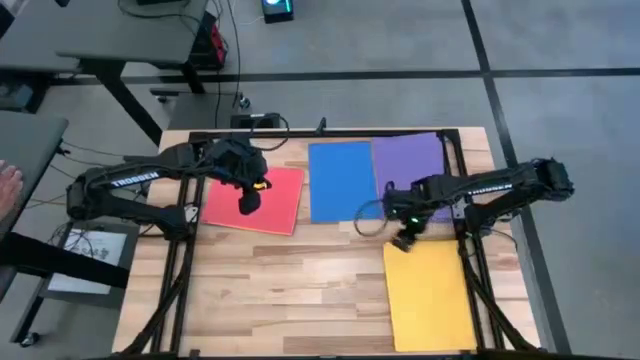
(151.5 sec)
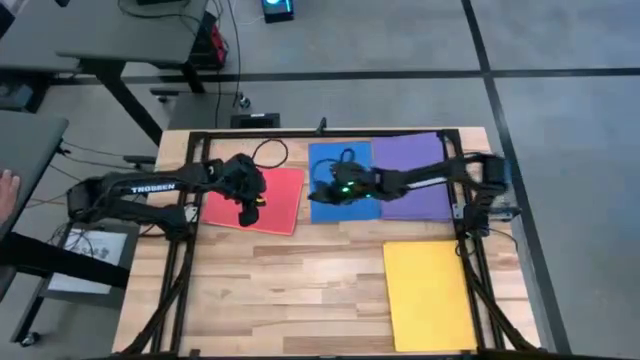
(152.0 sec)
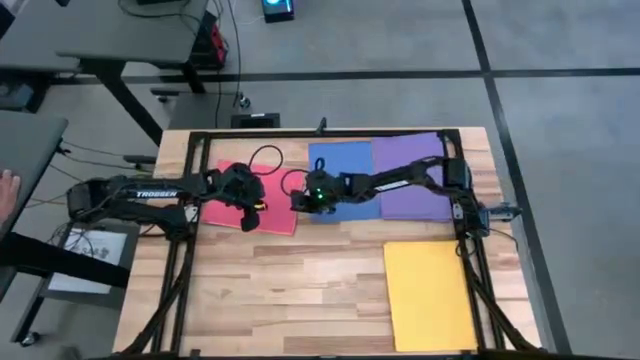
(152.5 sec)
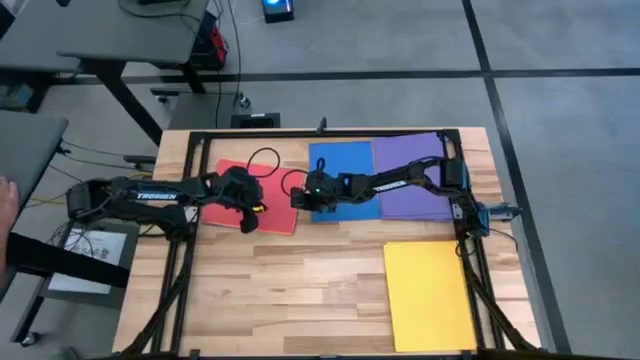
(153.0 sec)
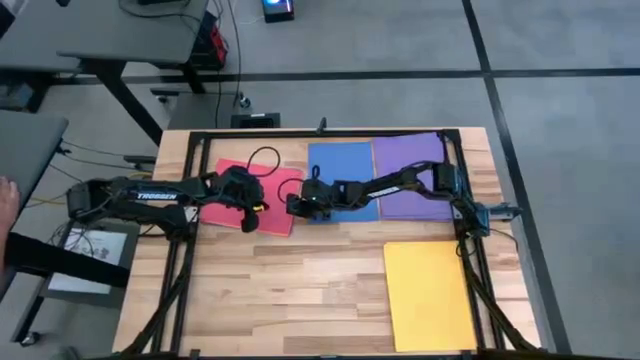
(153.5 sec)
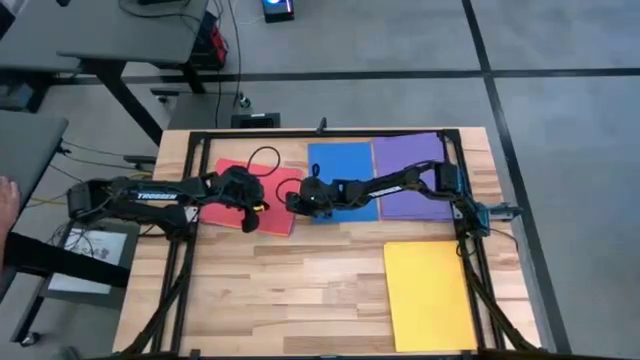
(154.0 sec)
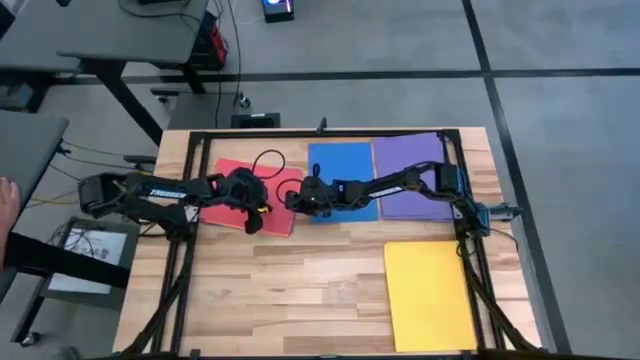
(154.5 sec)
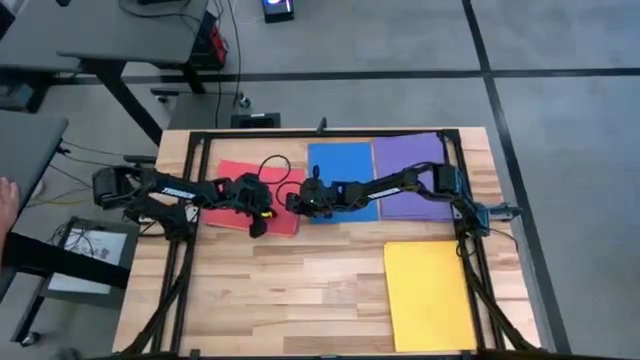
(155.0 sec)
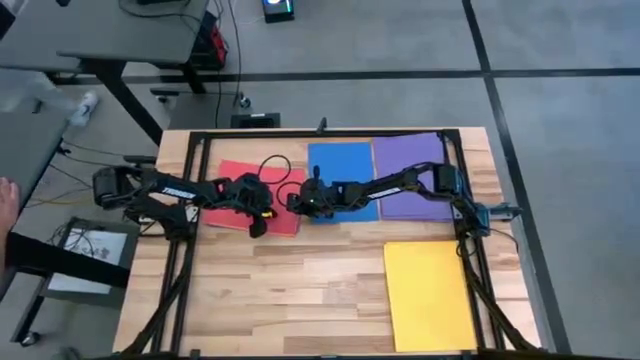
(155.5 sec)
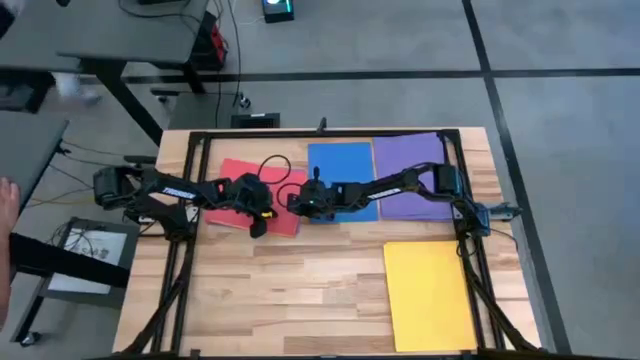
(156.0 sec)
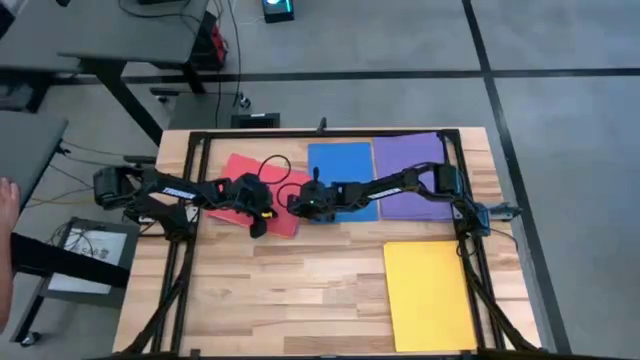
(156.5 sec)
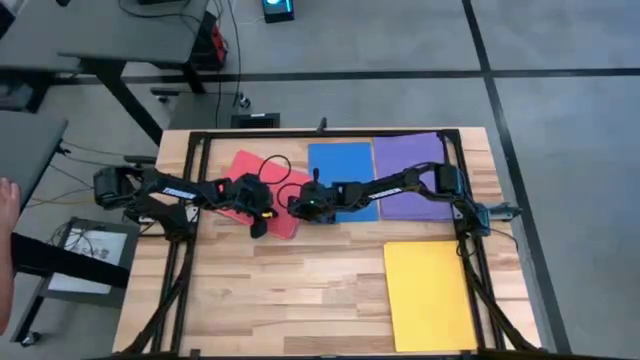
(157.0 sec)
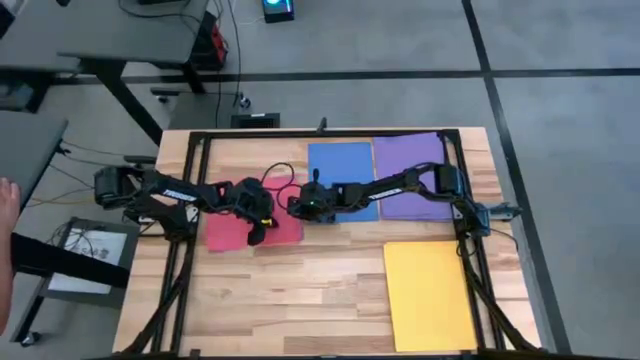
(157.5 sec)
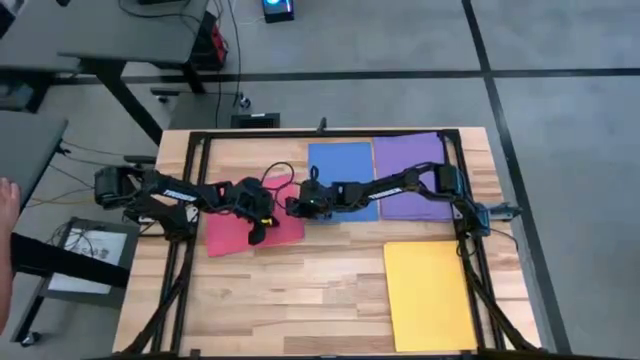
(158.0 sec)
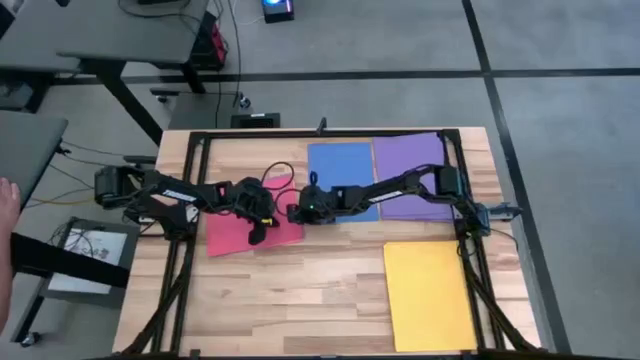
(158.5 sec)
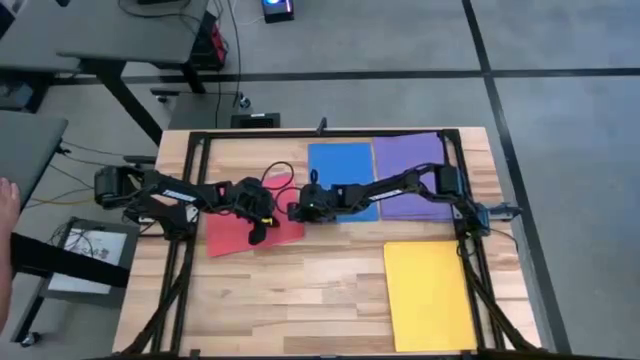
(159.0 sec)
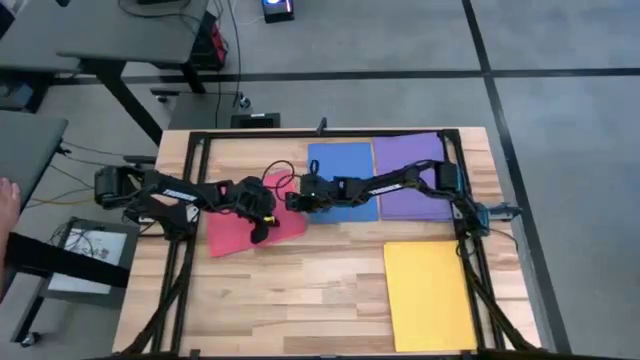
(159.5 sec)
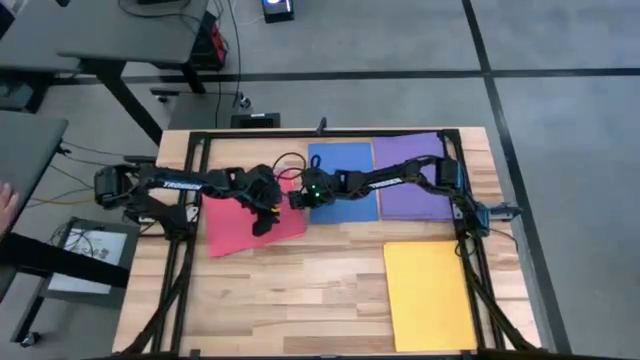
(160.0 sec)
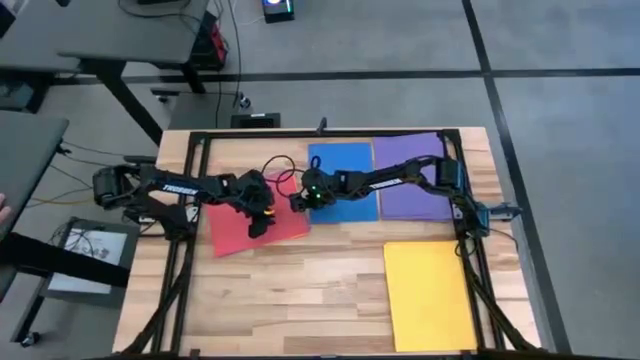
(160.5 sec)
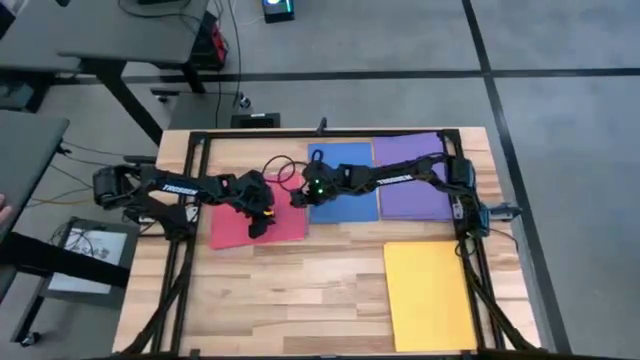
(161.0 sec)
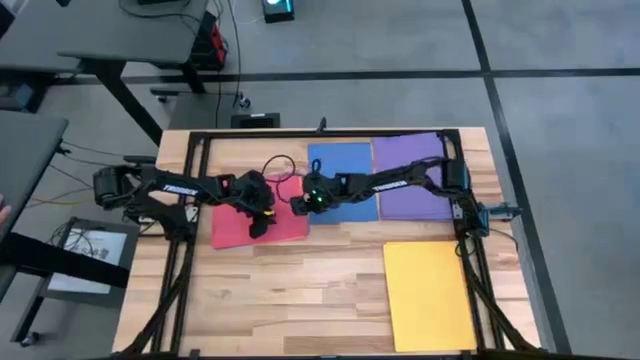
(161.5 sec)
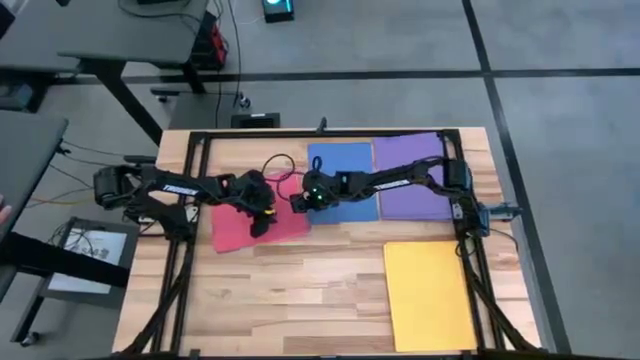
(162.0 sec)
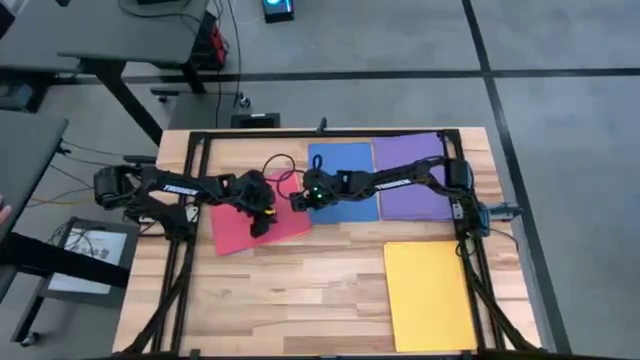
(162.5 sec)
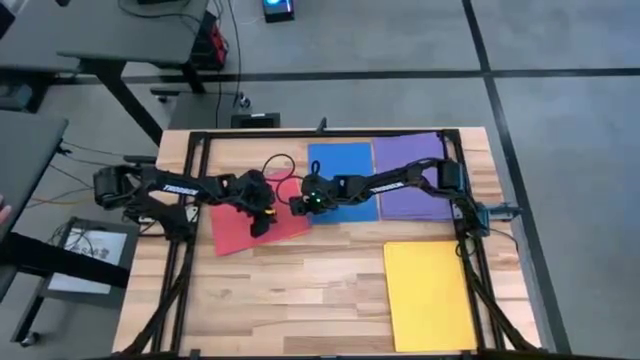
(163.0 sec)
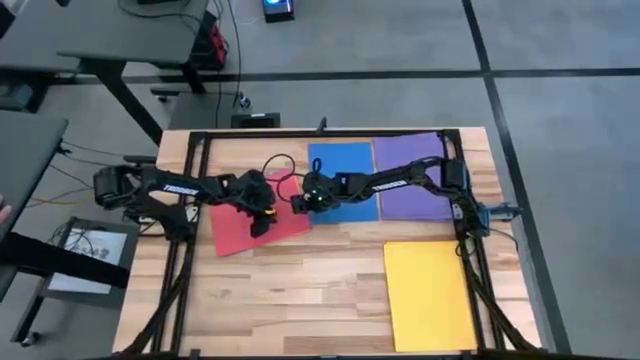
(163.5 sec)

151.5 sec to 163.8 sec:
Task: Organize paper
Put the pink paper into the bottom center of the table

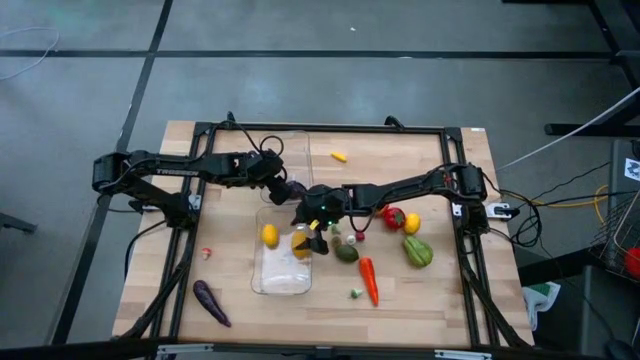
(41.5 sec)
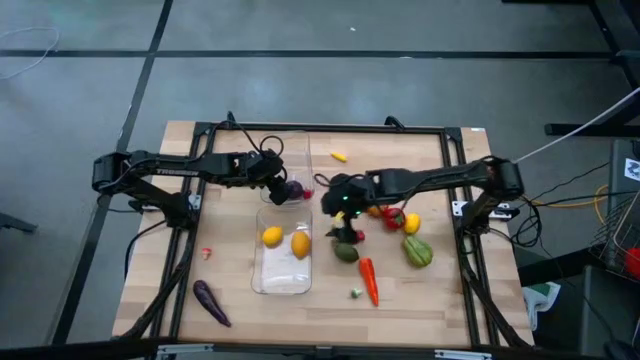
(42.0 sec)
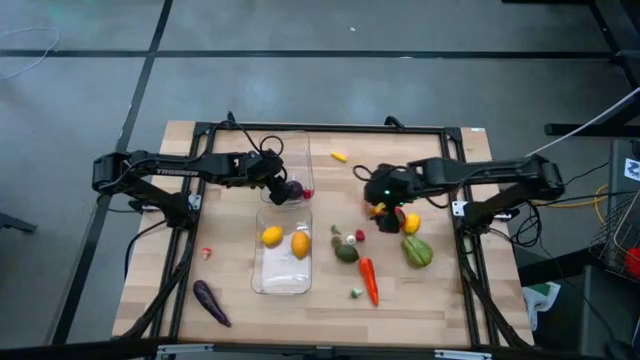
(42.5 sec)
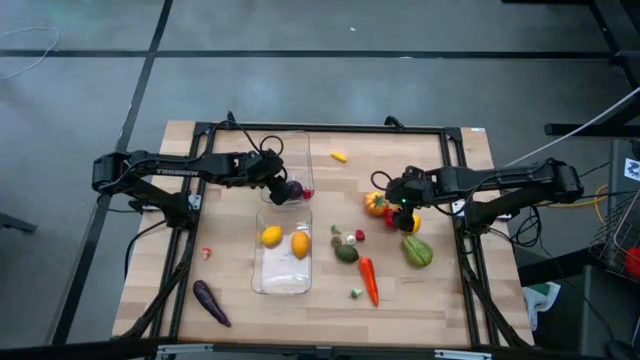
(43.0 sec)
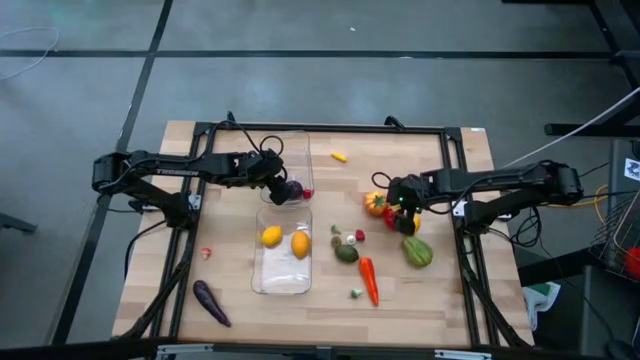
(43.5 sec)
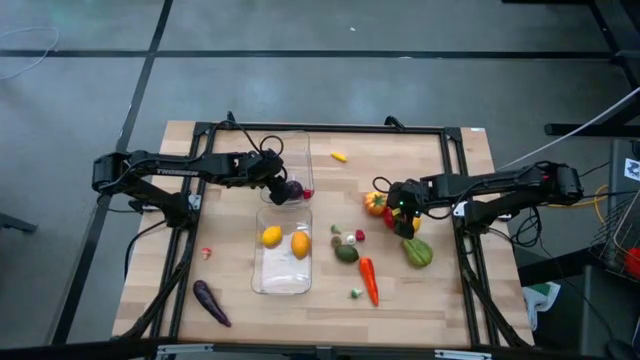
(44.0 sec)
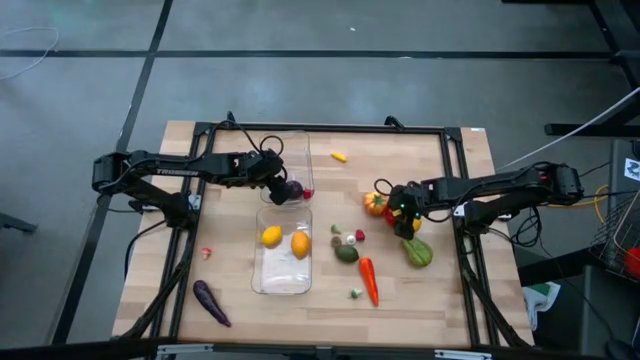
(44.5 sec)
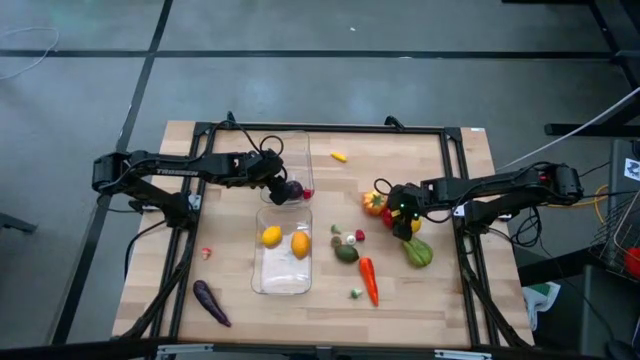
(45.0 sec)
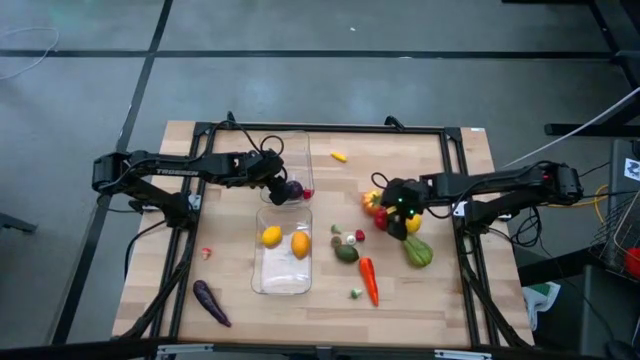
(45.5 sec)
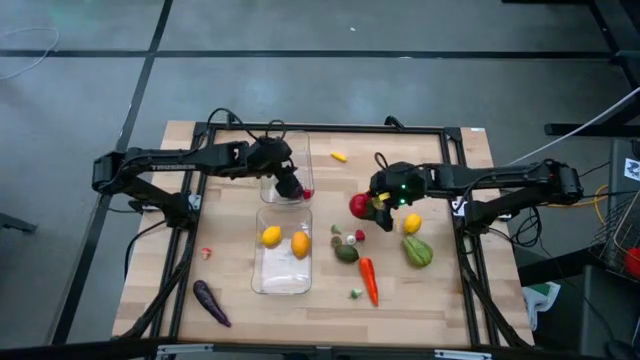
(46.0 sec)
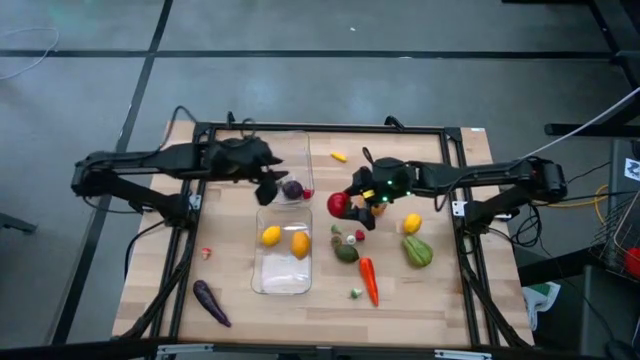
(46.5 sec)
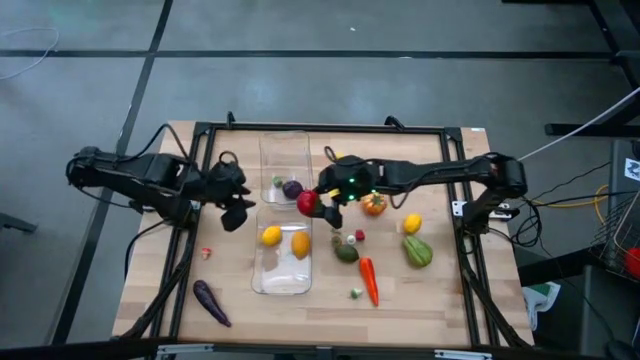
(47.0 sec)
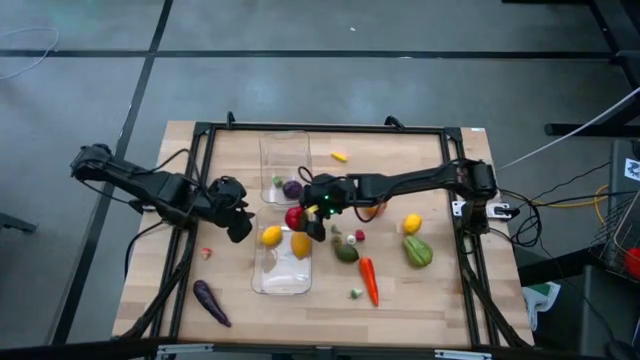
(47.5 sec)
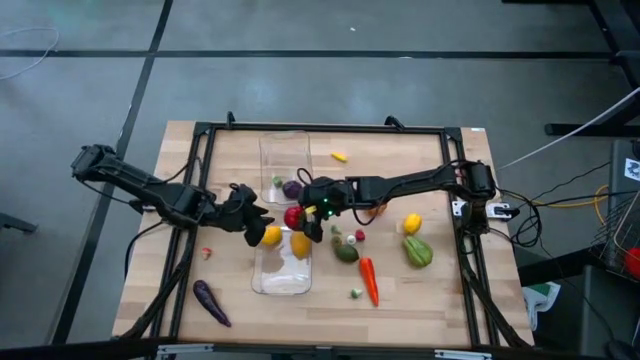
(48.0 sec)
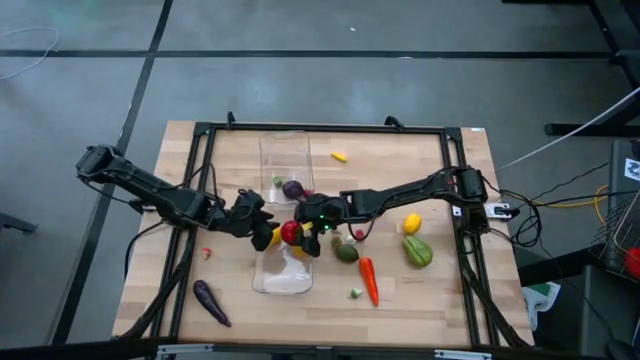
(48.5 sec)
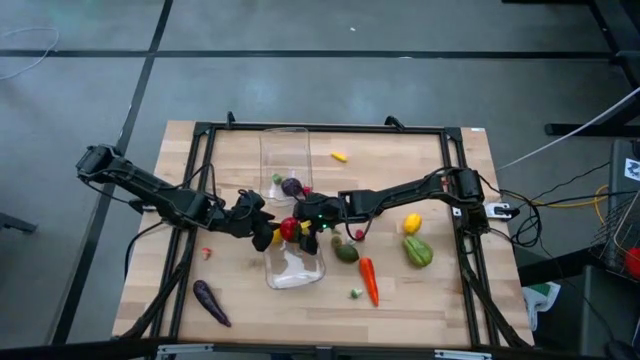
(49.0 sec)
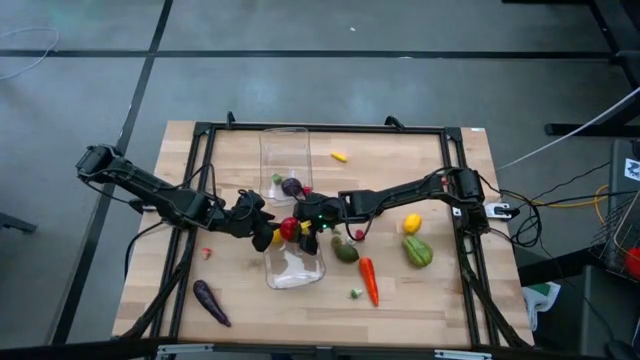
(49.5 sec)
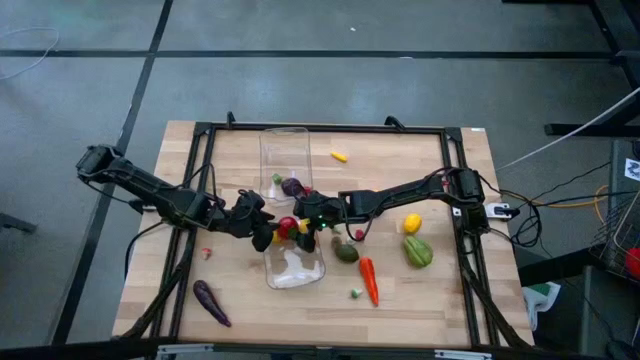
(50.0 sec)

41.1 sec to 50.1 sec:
Task: Sort produce into baskets
Put the red tomato into the bottom transparent bin
